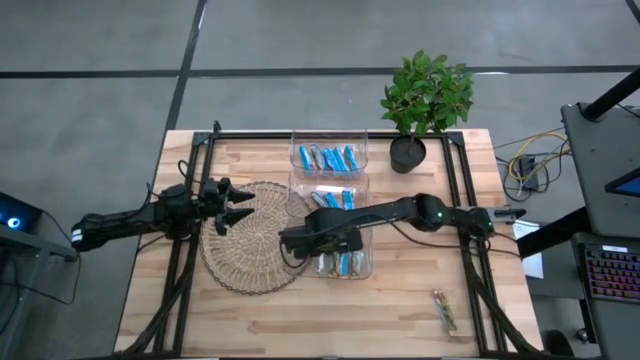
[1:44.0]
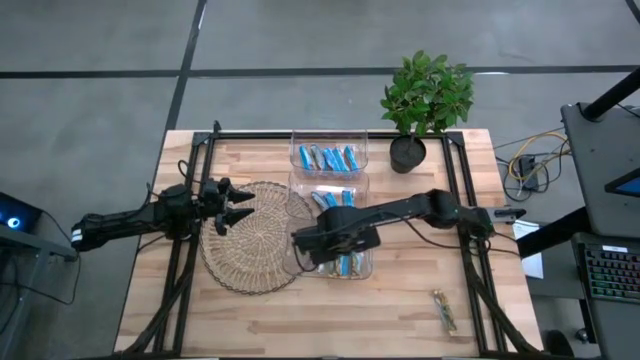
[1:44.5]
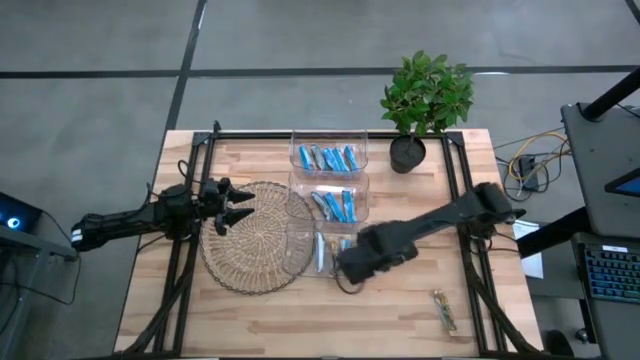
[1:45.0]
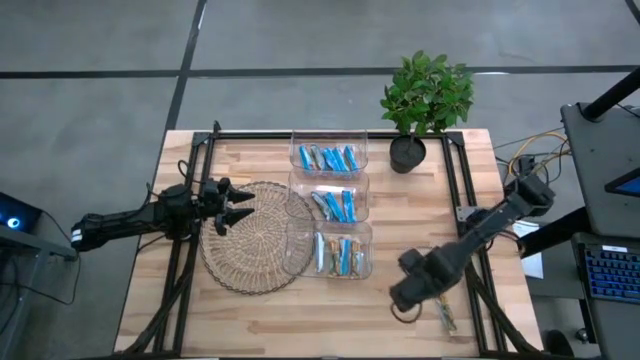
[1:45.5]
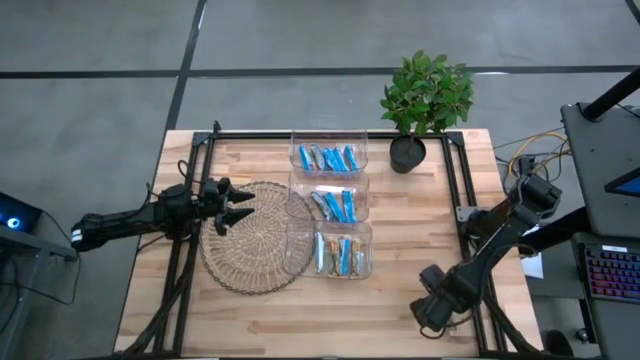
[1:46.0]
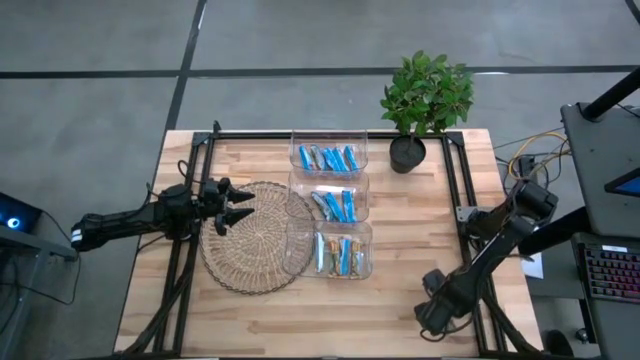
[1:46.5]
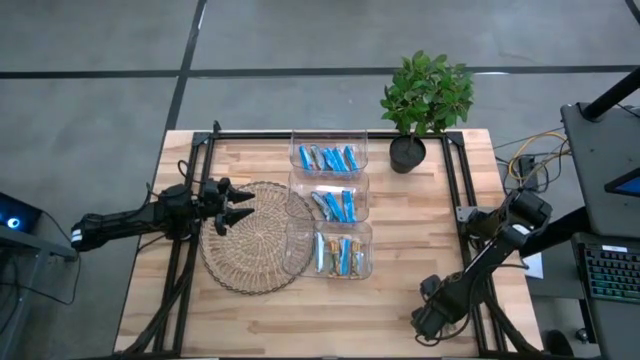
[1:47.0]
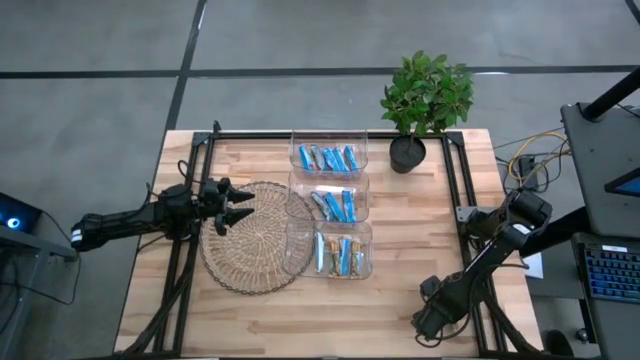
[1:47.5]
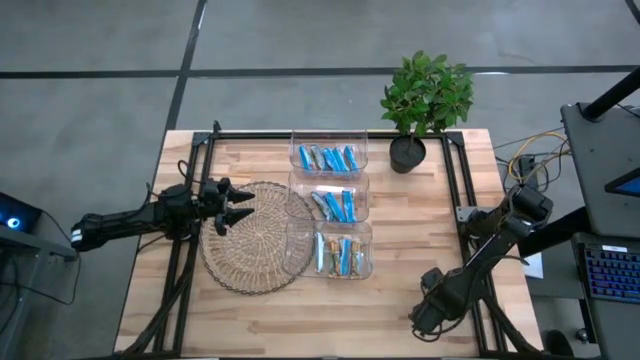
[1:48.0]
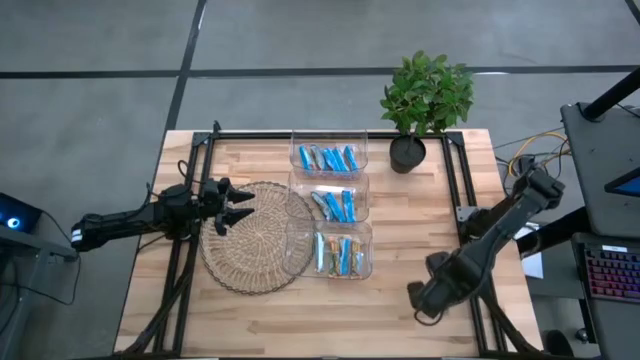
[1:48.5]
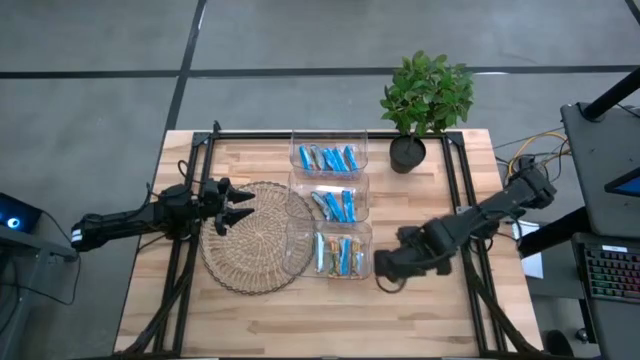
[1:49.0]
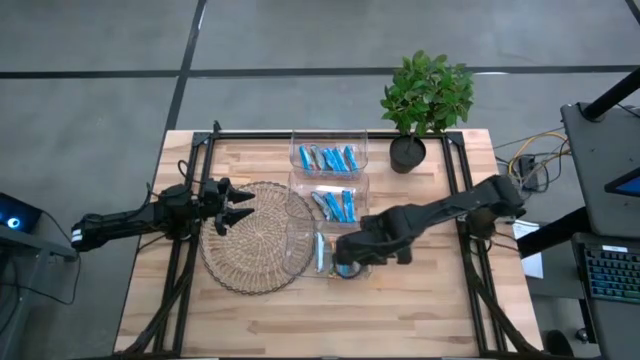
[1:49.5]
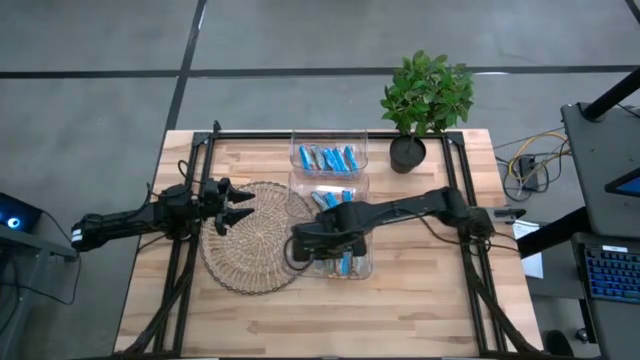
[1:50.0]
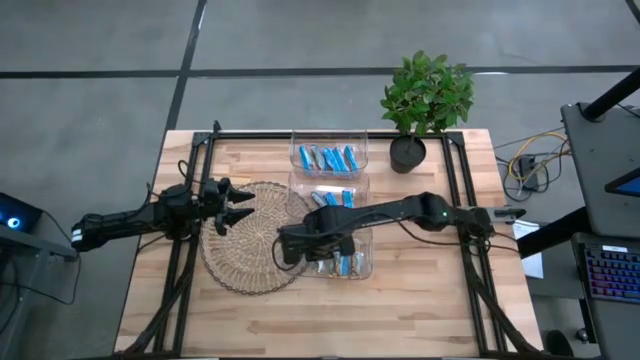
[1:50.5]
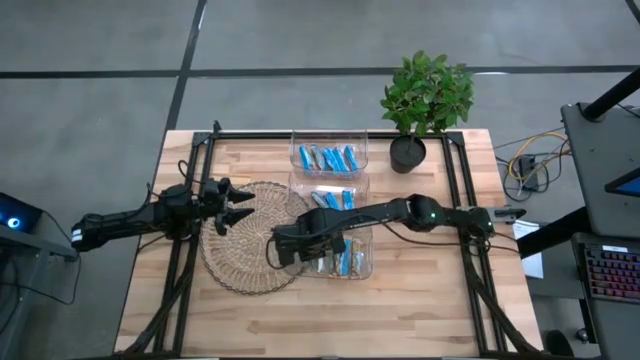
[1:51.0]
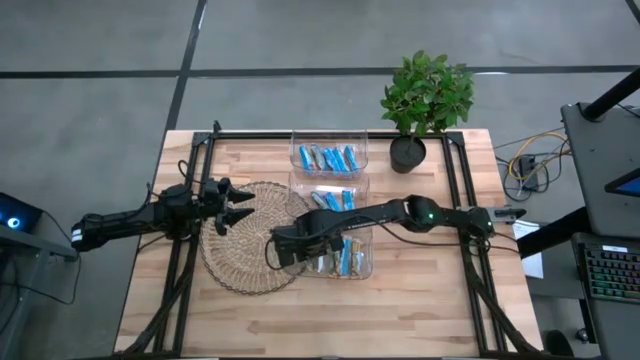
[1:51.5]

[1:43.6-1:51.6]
Task: Pick and place Granola Bars by type
Put the yellow granola bar into the bottom transparent bin

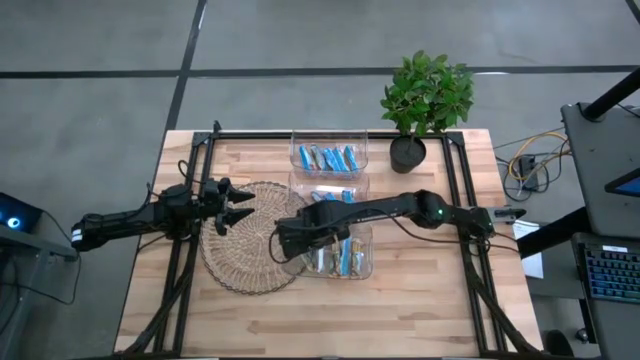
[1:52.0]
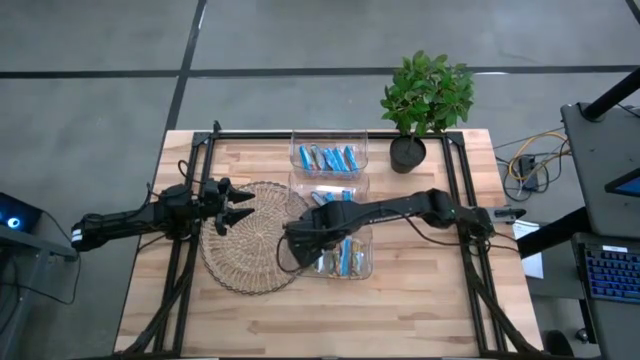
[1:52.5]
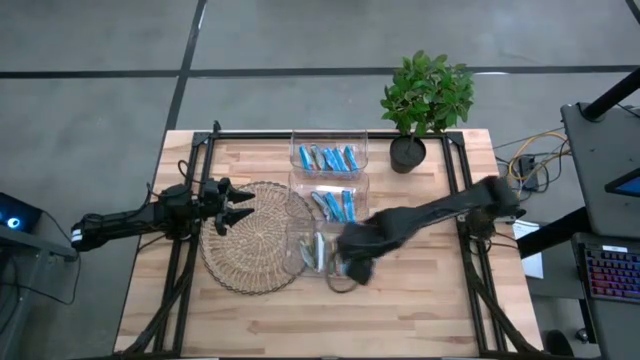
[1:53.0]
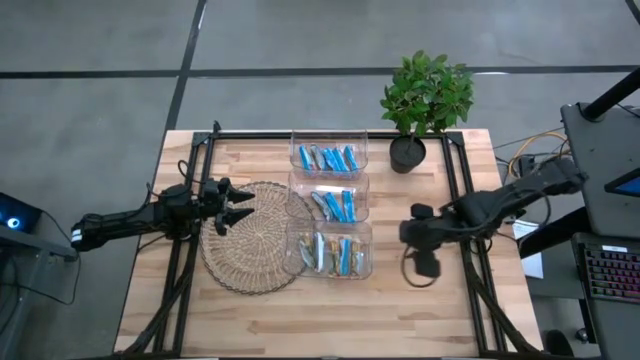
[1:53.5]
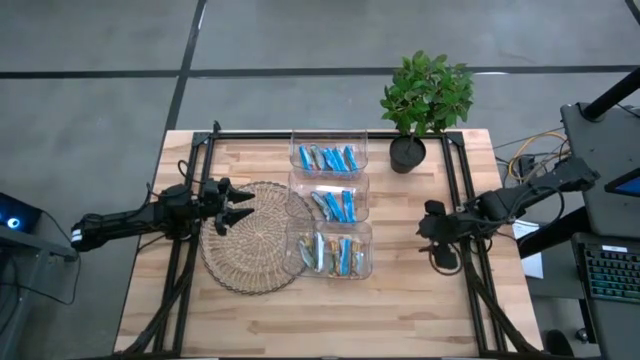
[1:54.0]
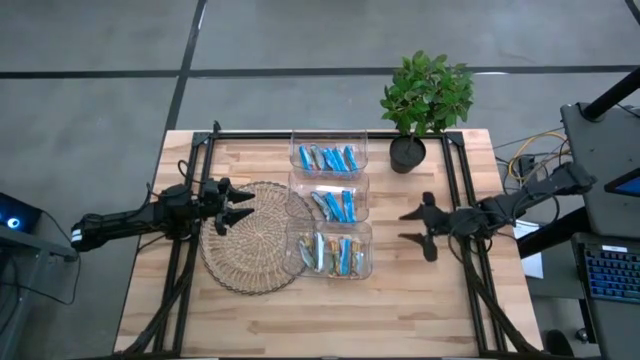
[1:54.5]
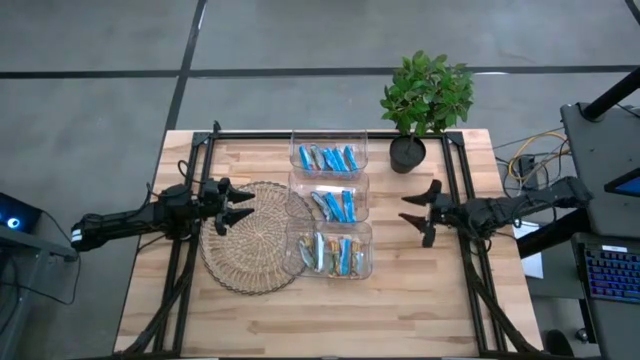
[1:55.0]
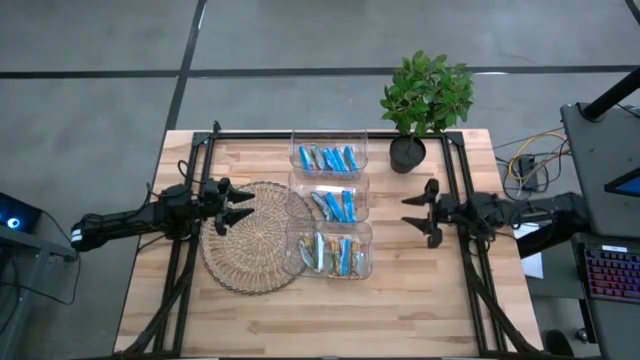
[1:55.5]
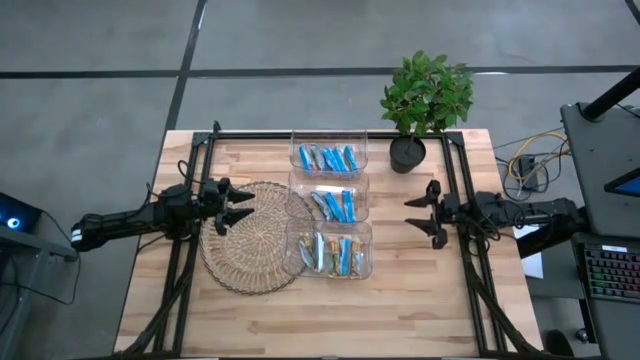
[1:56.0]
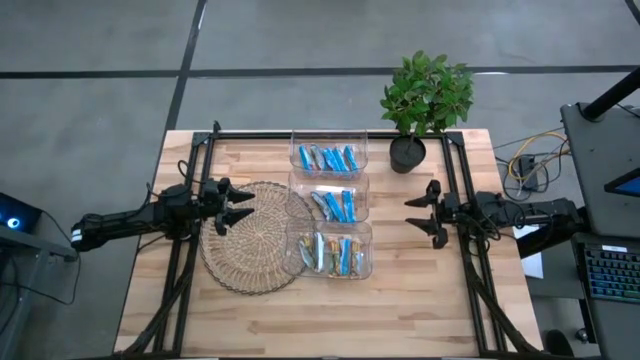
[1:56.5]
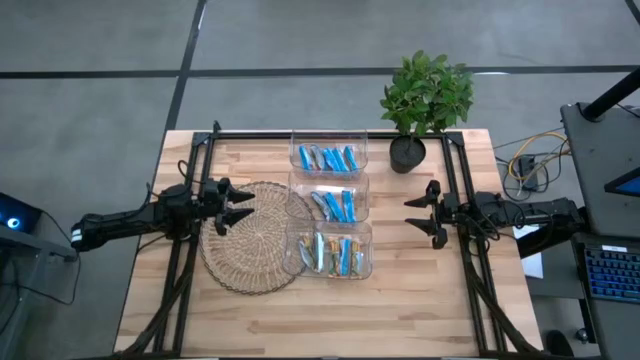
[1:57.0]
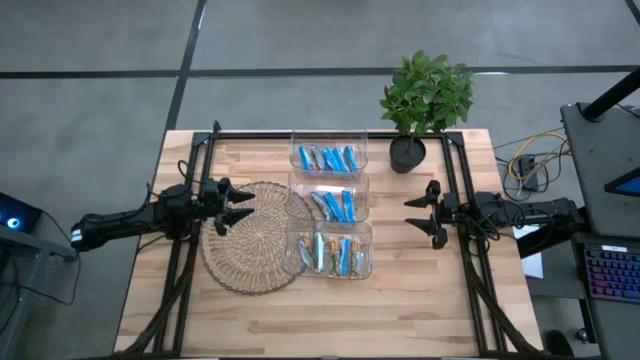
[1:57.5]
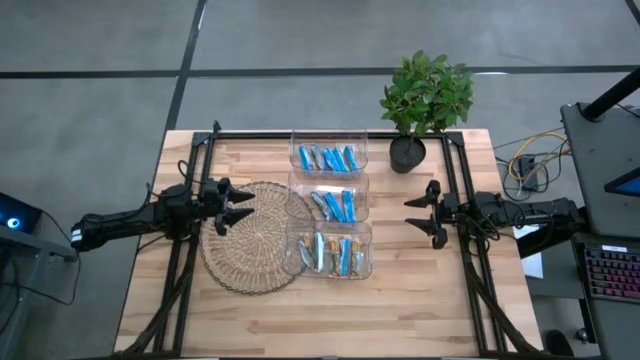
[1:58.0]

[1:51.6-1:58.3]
Return to Home Position

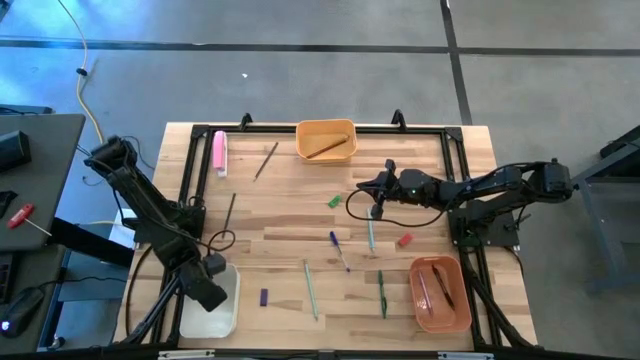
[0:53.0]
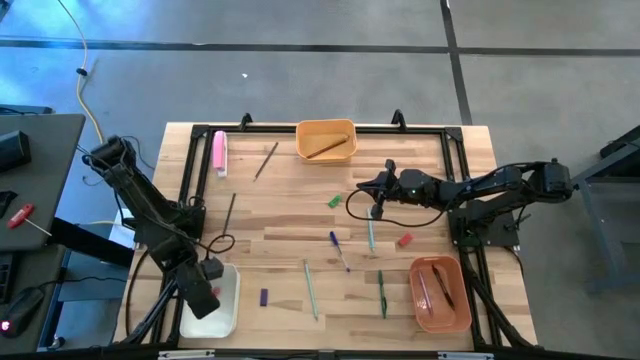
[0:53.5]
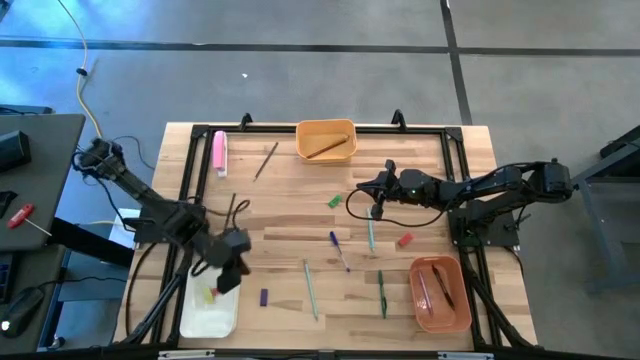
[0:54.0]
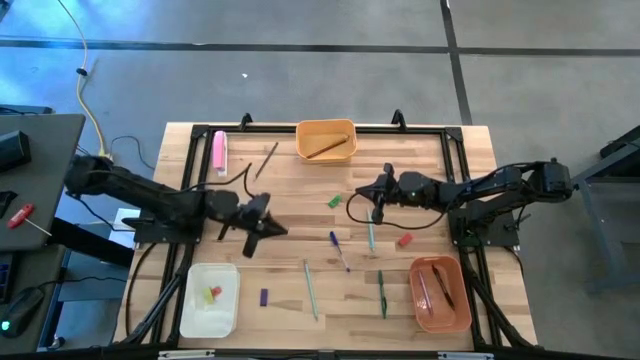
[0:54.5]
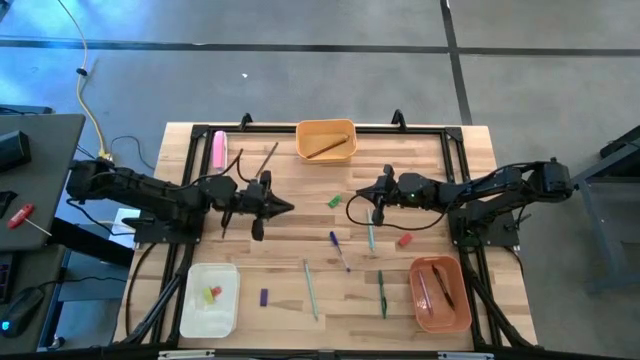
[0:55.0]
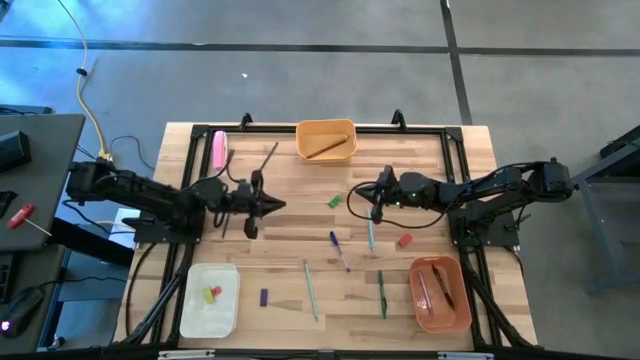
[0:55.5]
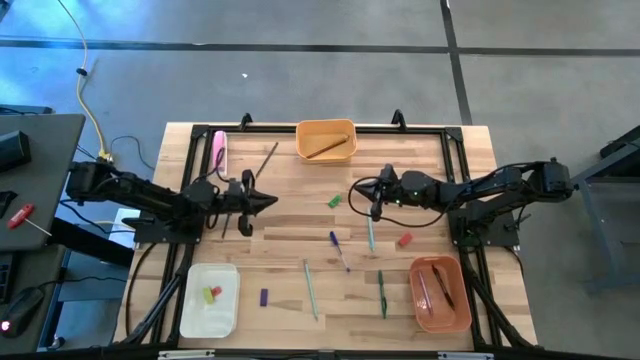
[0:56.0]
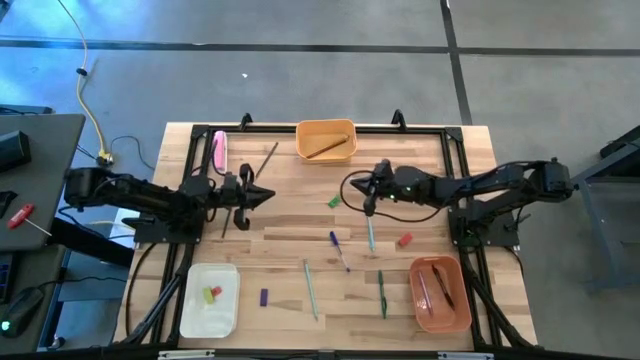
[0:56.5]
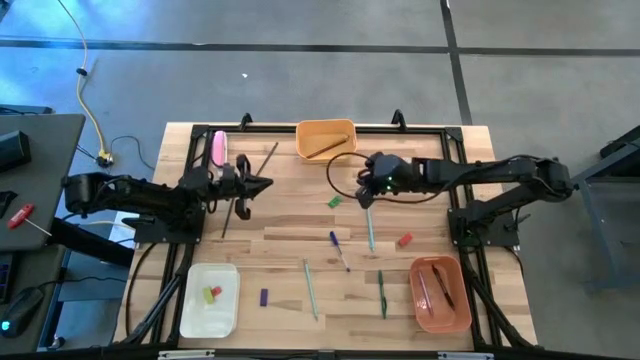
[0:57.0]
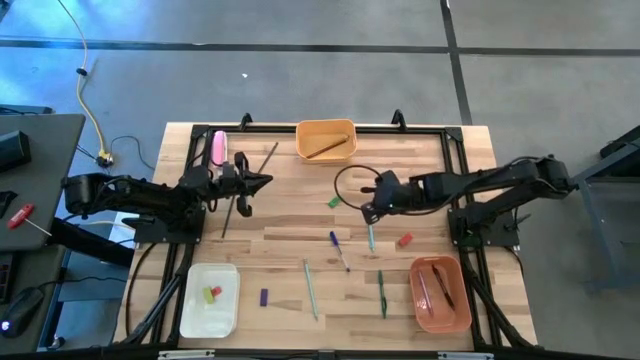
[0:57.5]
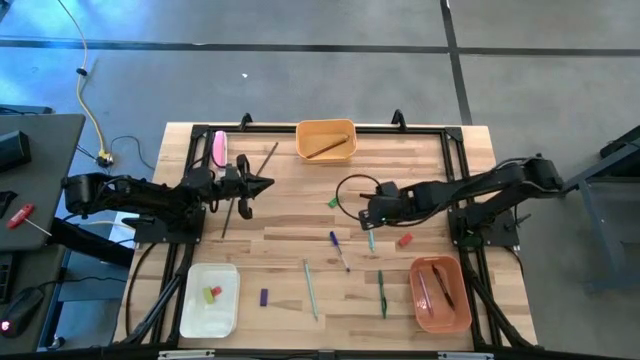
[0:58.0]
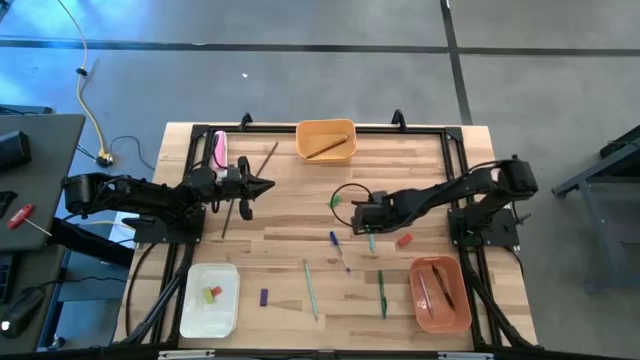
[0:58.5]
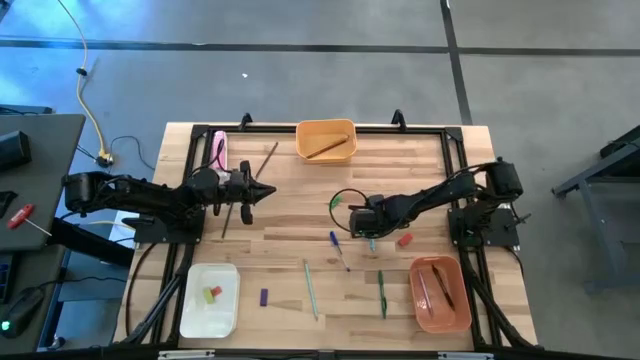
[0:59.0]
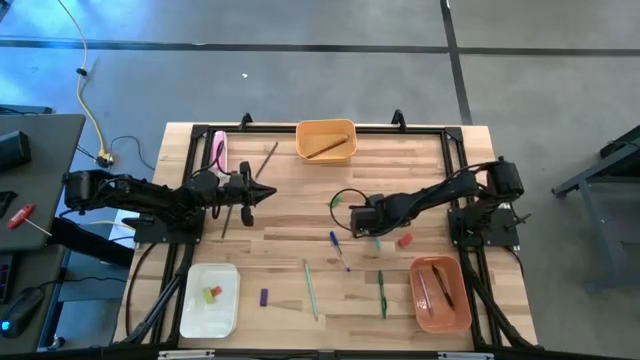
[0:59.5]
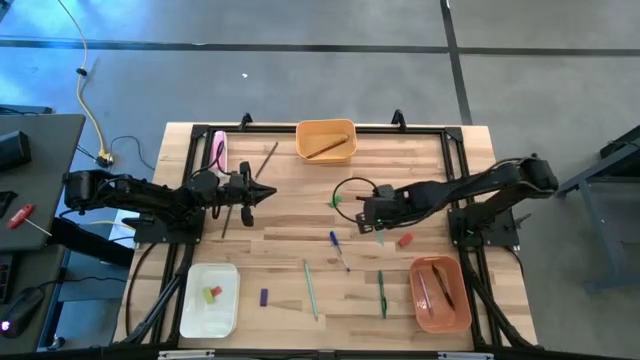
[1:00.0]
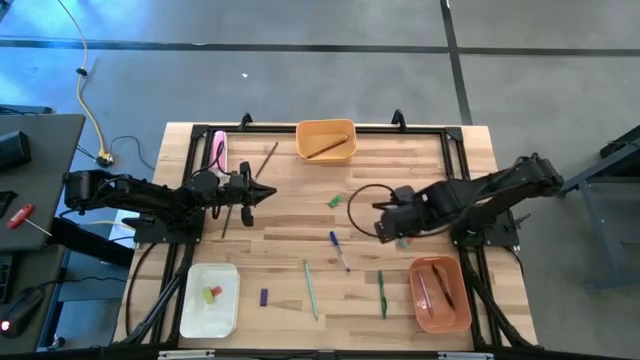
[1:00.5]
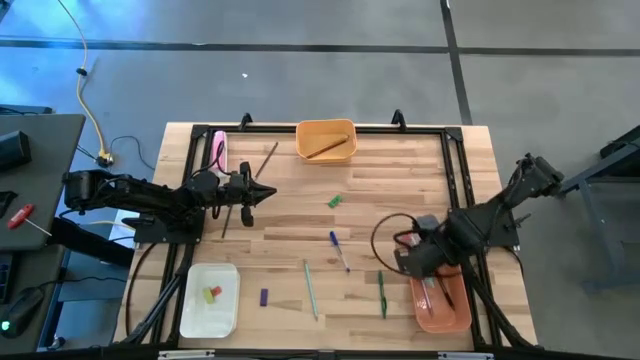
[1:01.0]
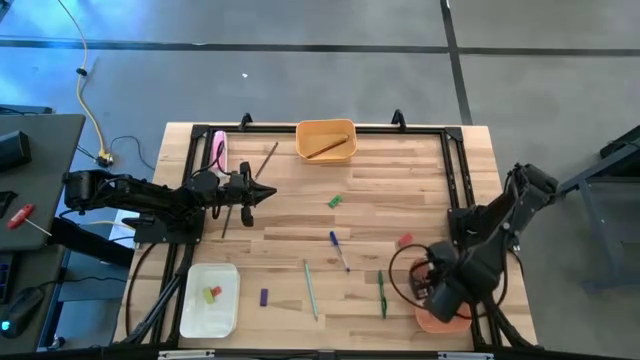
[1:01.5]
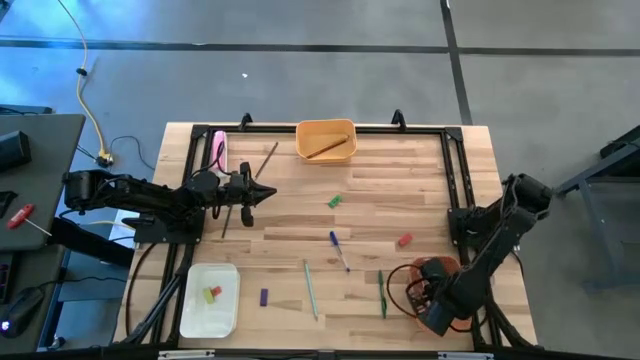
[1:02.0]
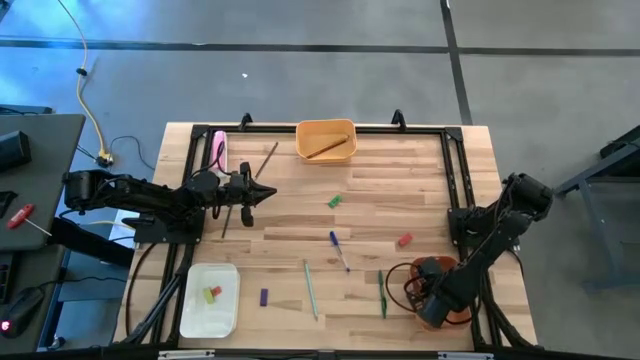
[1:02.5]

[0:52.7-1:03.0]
Task: Sort crayons/erasers/pens/pencils in bins
Put the light blue pen into the orange bin
